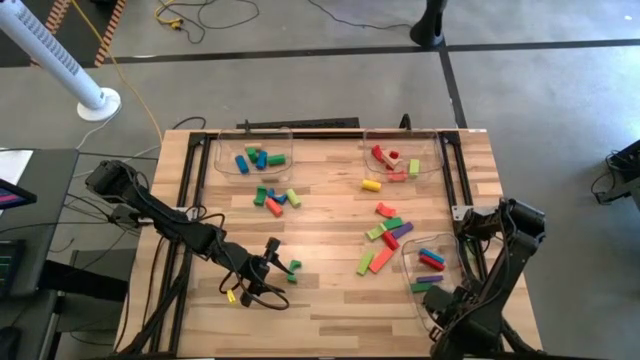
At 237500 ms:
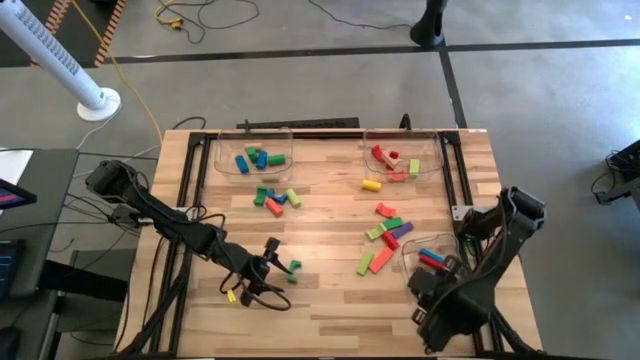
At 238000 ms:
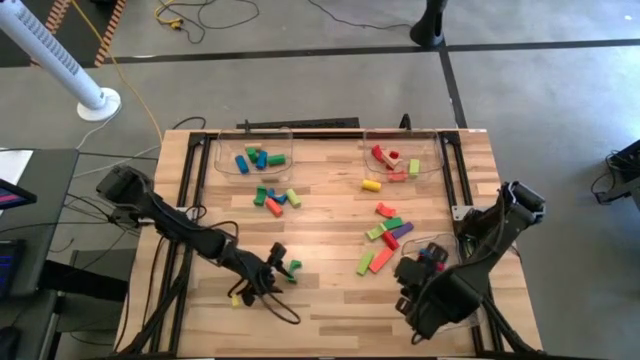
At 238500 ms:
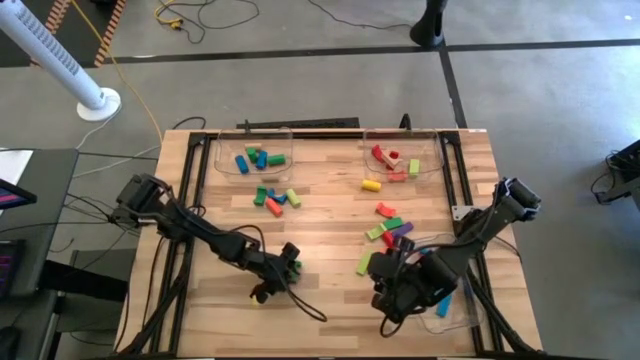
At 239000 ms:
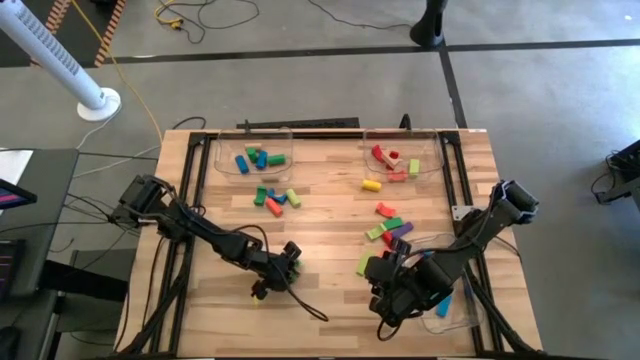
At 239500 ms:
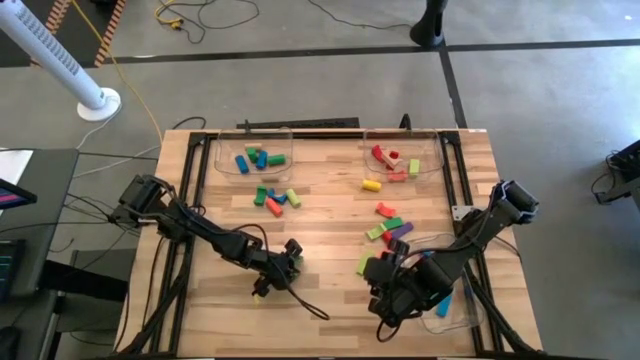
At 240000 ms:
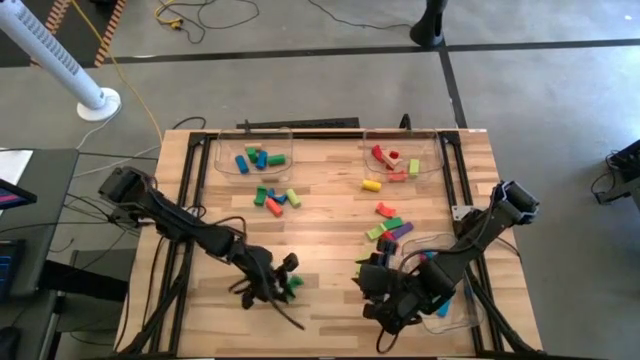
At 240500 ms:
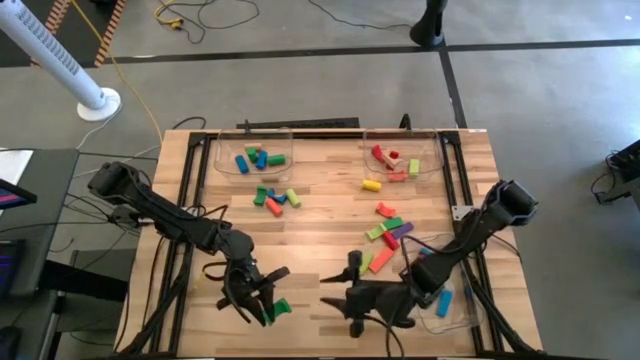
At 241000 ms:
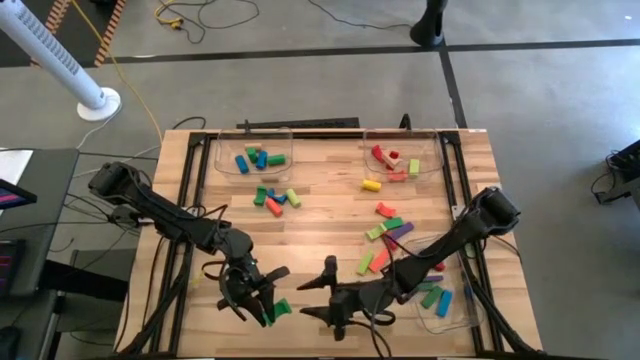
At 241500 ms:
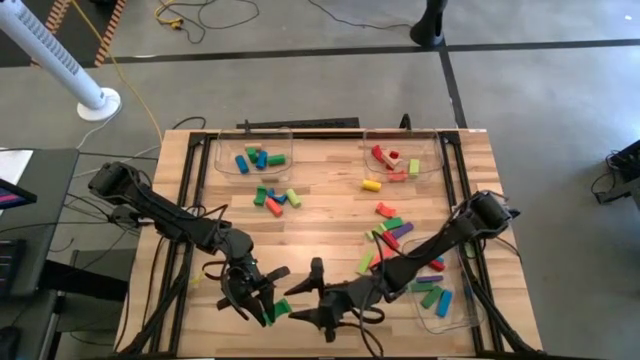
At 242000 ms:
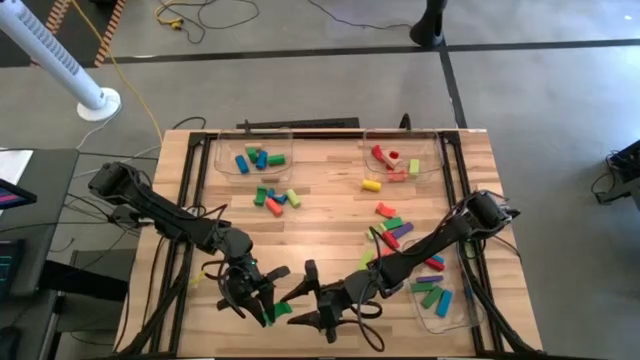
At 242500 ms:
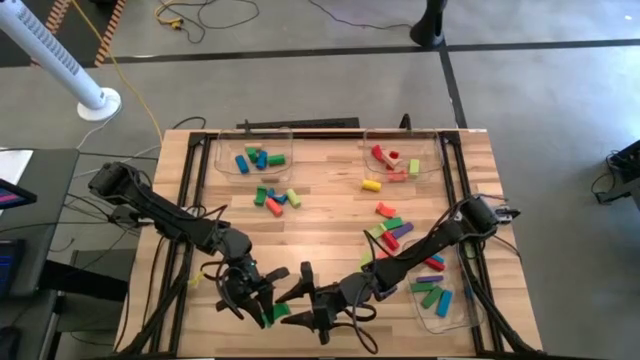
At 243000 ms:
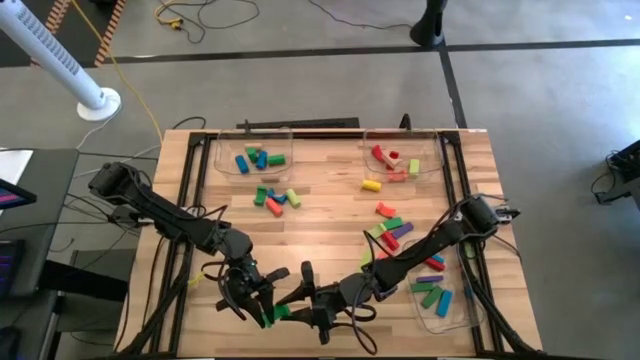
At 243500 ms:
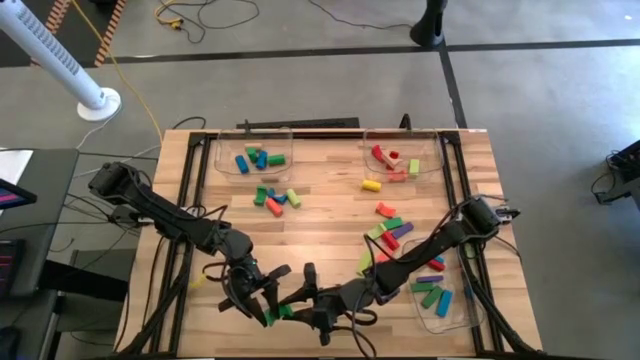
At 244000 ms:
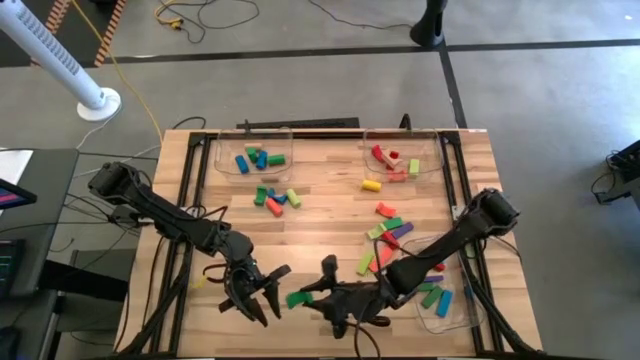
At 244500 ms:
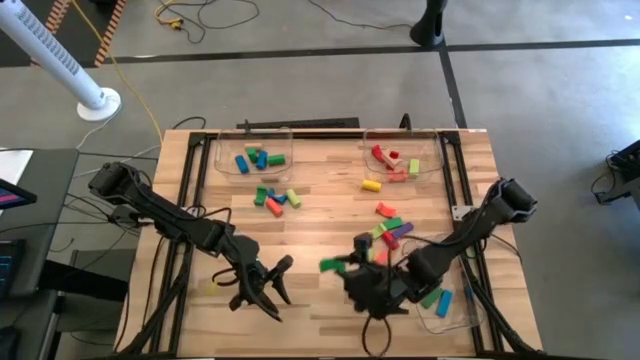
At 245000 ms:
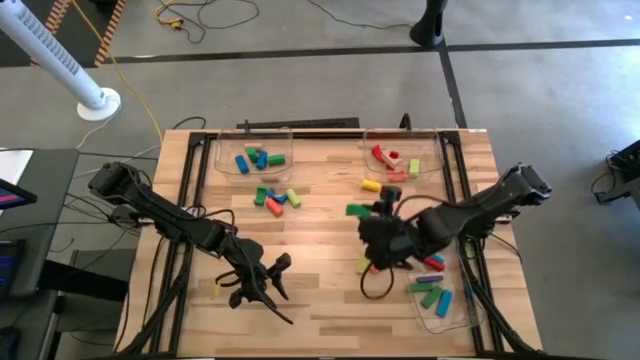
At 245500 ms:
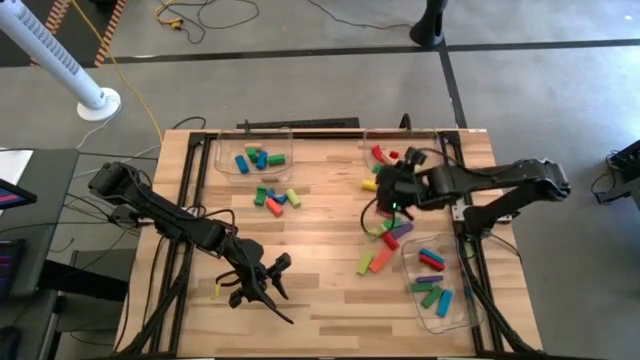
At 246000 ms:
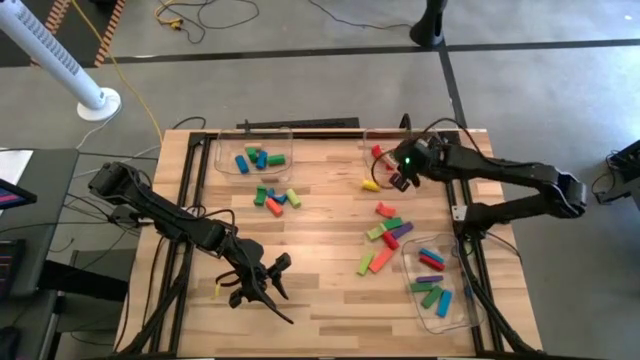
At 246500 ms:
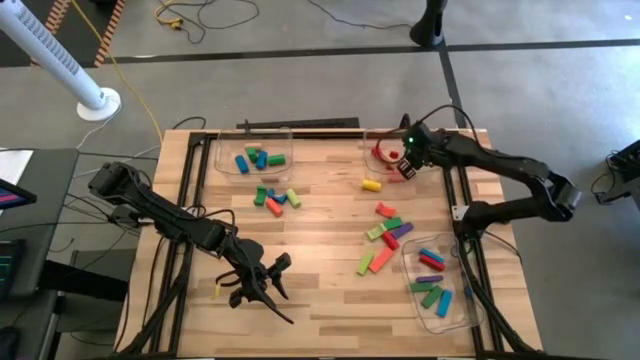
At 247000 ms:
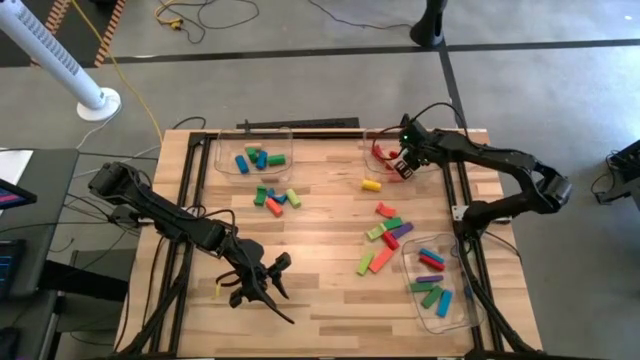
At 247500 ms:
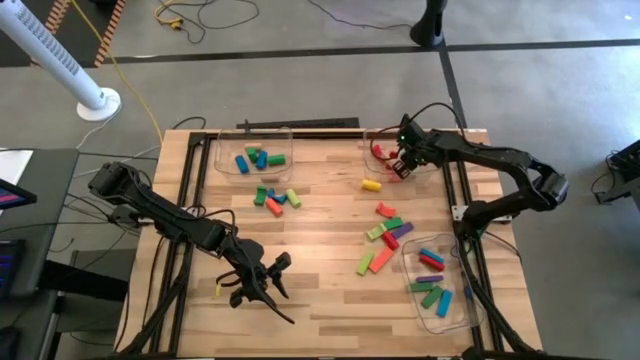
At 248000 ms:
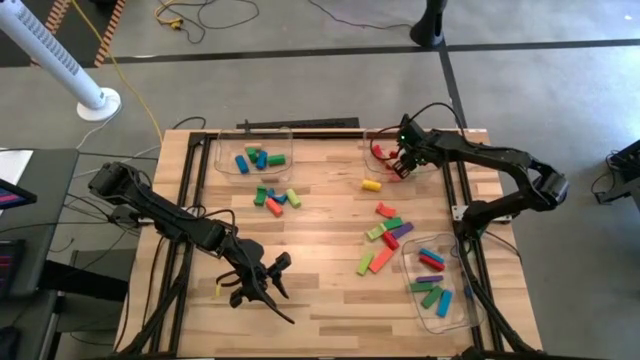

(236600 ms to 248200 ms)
Task: Sort blocks by size
Put the green arch block into the top right transparent bin

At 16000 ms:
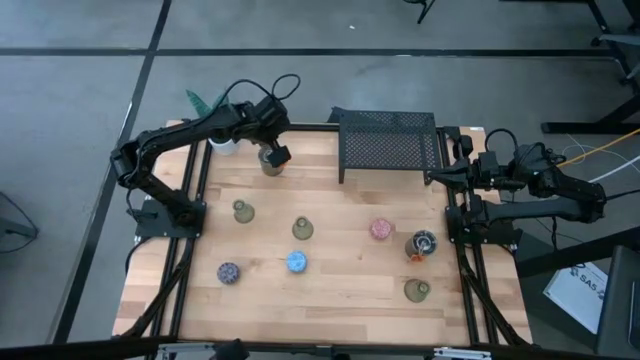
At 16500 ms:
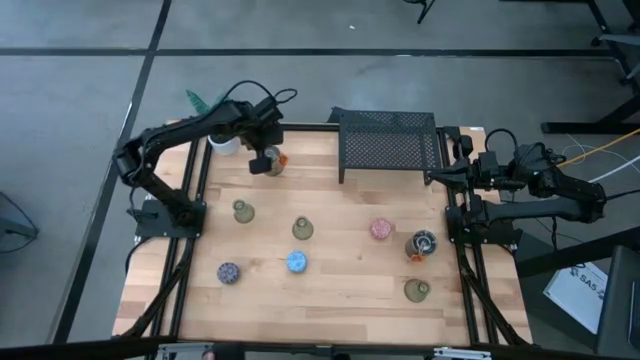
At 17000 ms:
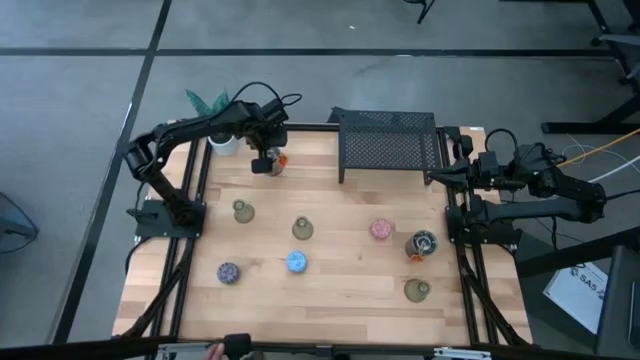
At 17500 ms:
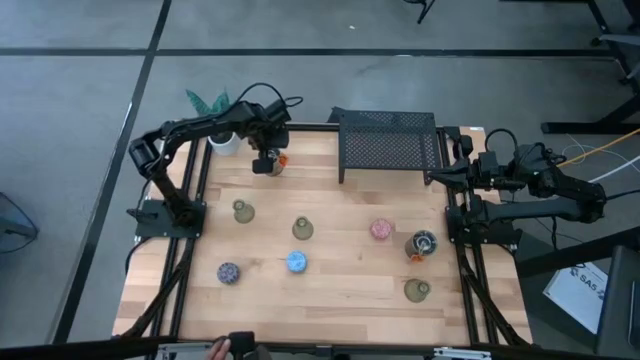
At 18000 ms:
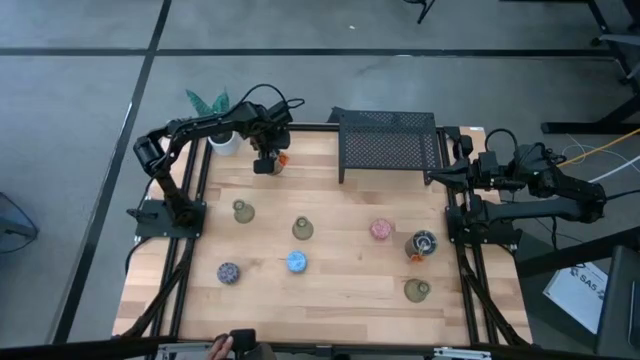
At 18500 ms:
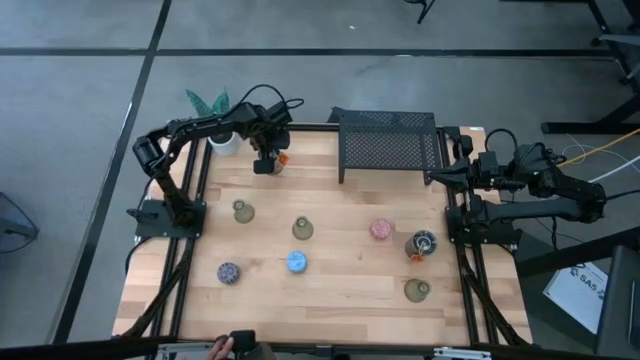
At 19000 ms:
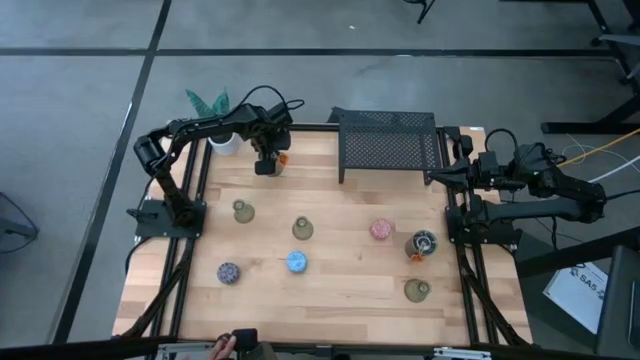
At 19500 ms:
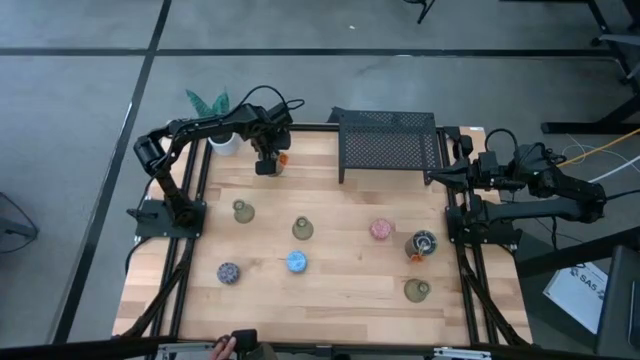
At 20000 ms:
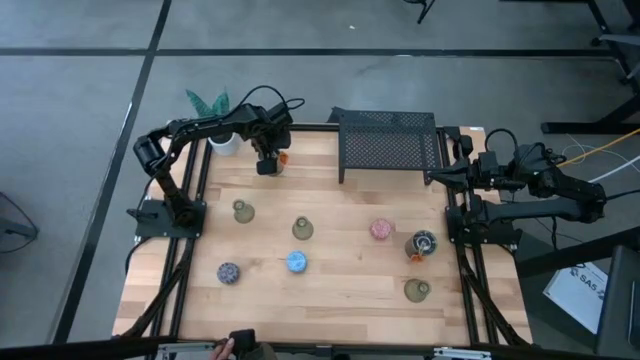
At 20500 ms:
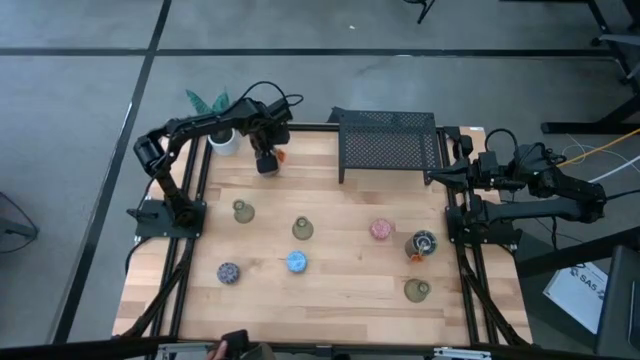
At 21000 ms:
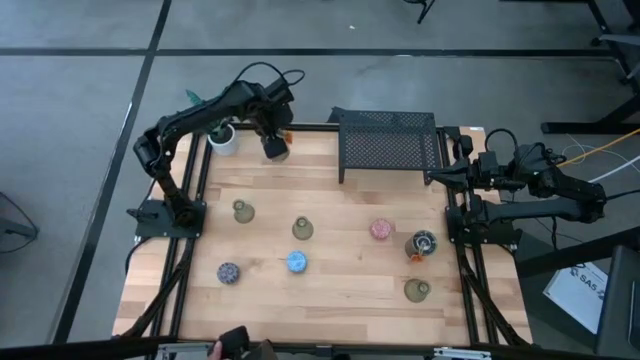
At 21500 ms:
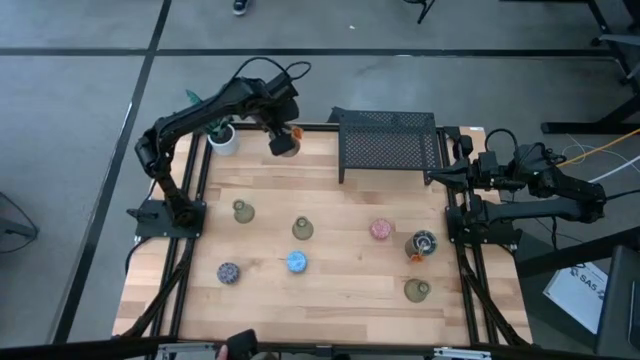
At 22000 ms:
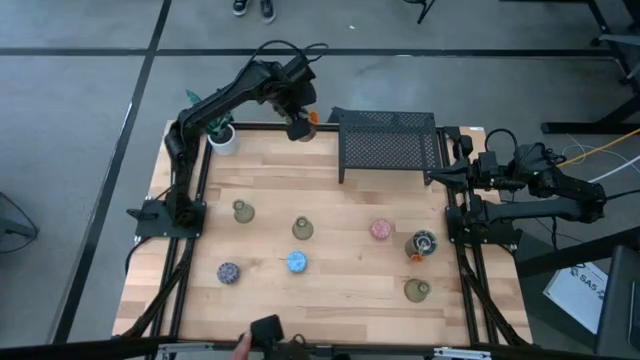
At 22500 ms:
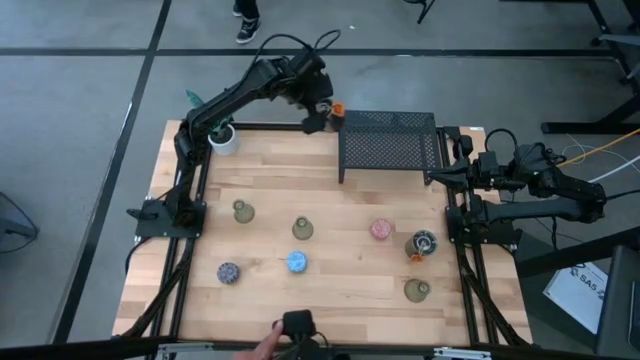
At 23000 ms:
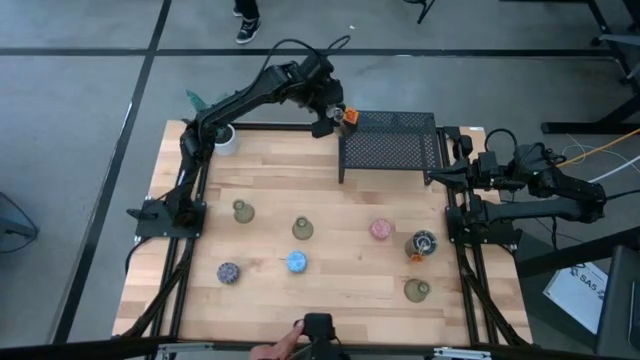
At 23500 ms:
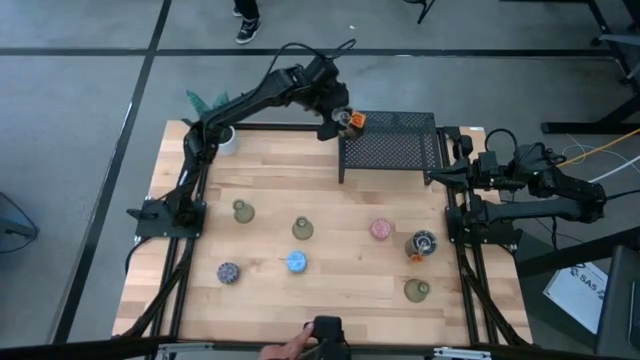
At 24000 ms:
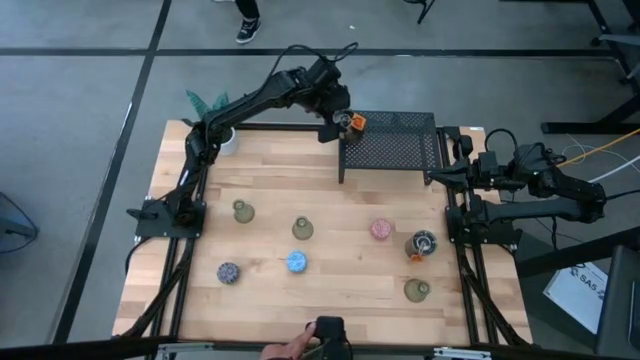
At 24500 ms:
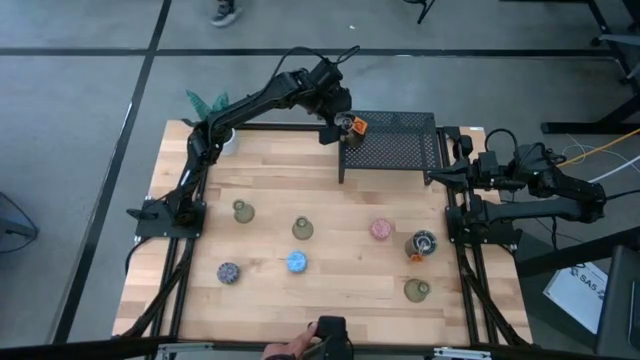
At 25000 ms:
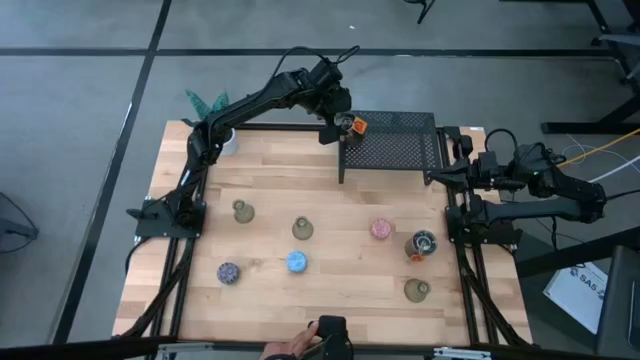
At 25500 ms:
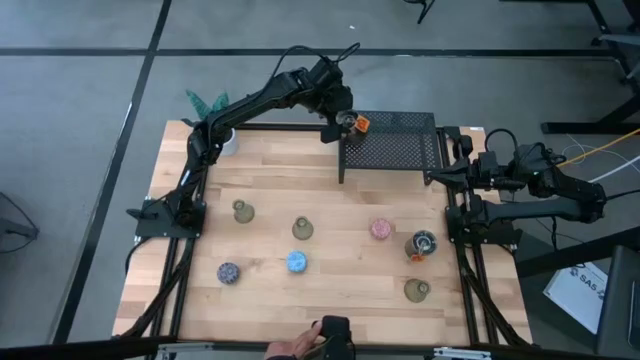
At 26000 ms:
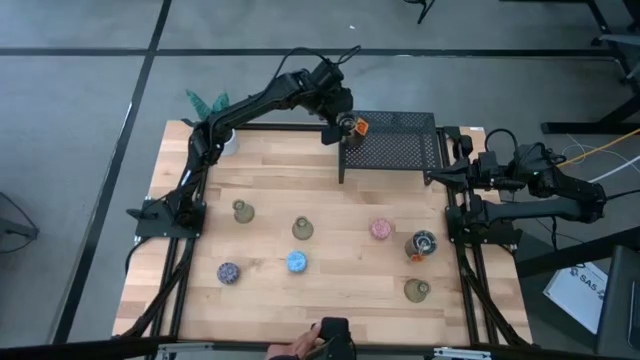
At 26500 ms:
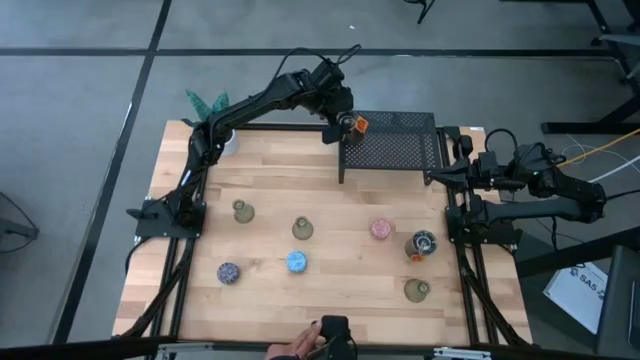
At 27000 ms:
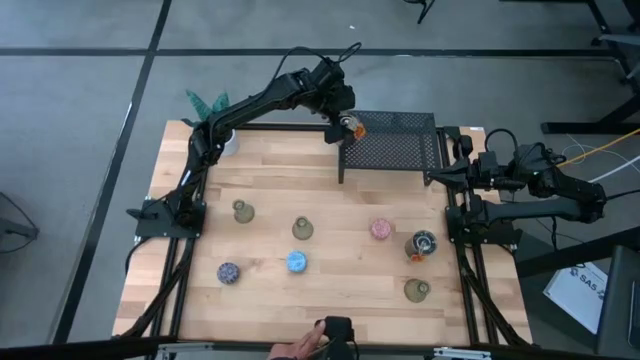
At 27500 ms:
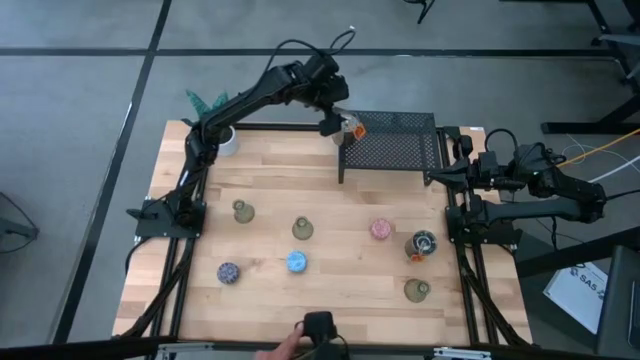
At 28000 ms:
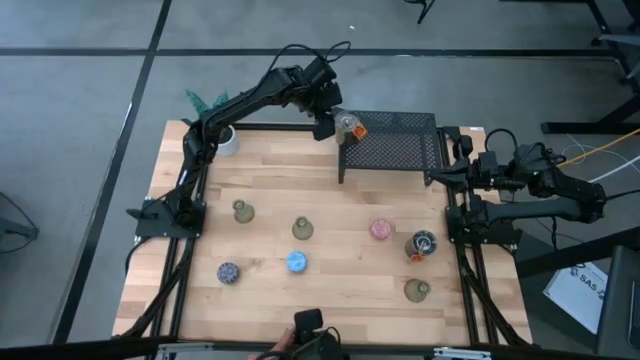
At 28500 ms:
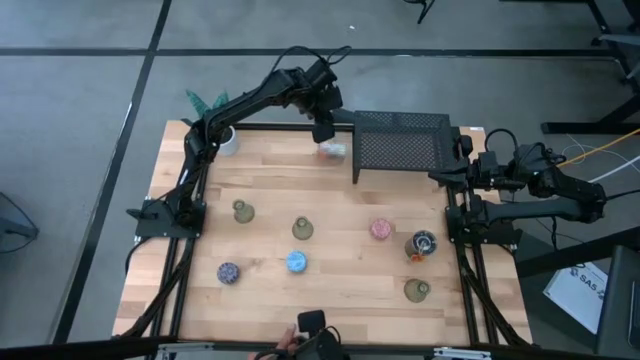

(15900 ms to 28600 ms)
Task: Pick & Place candle stick holders
Put the top silver scented candle on the shelf
